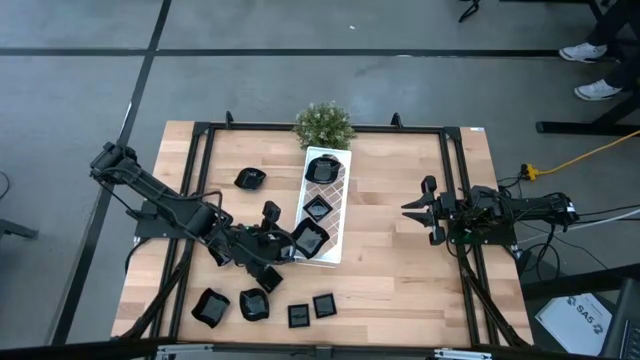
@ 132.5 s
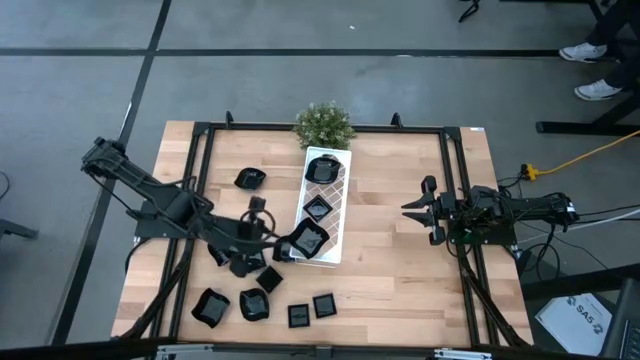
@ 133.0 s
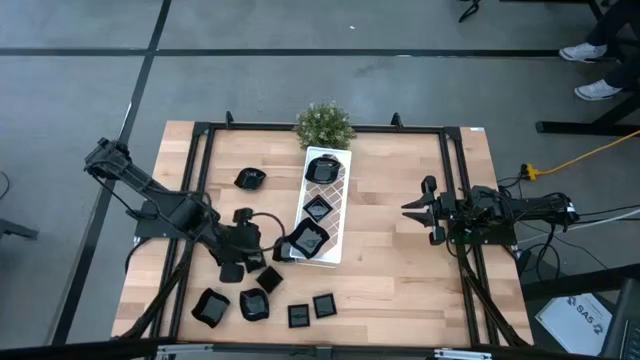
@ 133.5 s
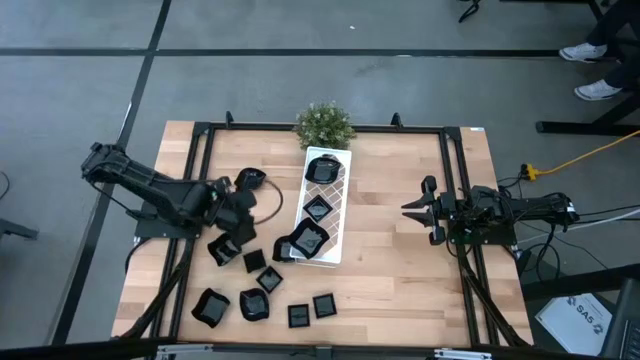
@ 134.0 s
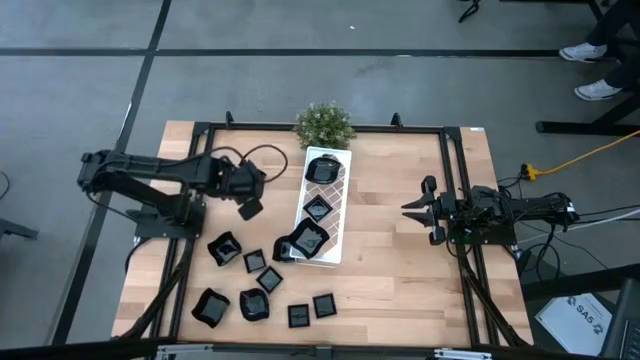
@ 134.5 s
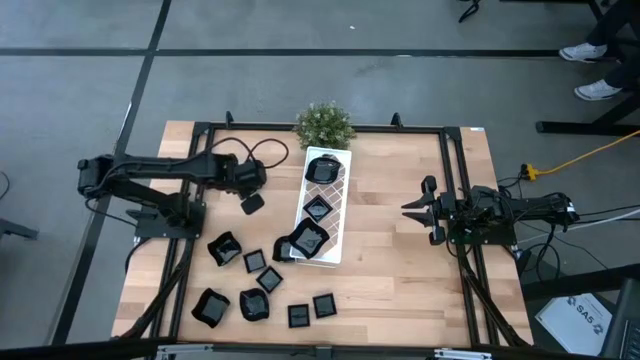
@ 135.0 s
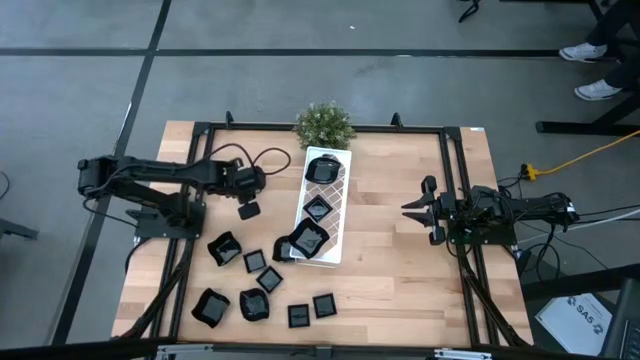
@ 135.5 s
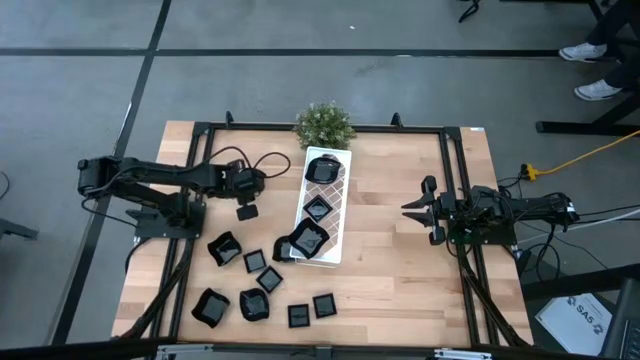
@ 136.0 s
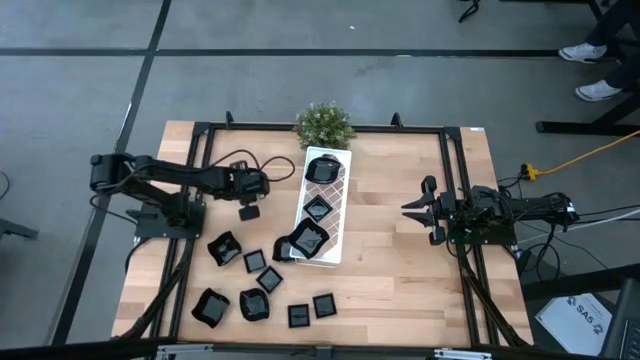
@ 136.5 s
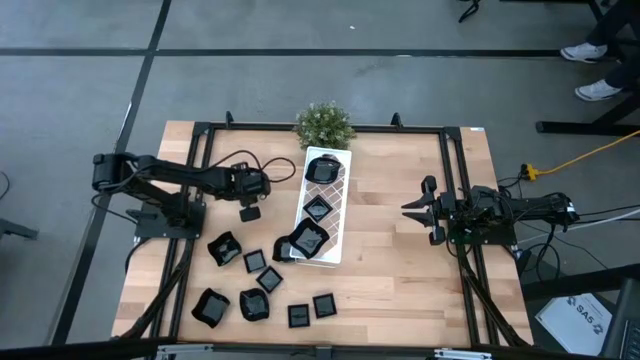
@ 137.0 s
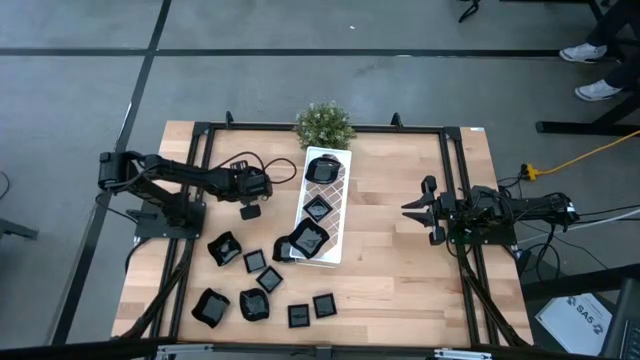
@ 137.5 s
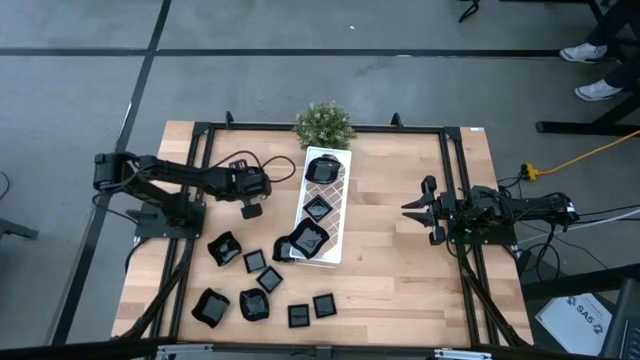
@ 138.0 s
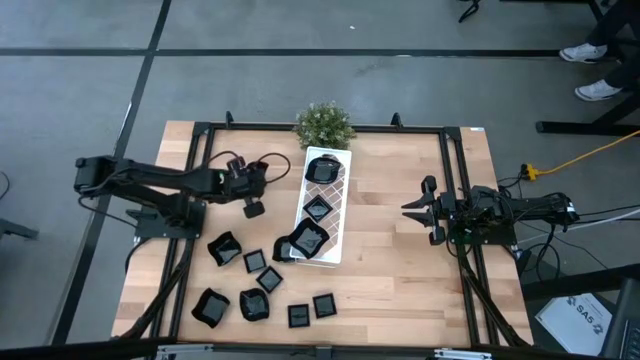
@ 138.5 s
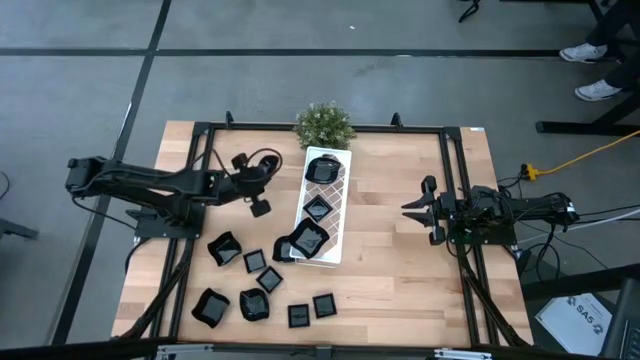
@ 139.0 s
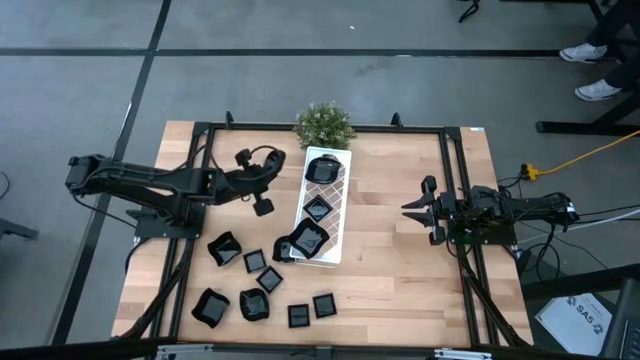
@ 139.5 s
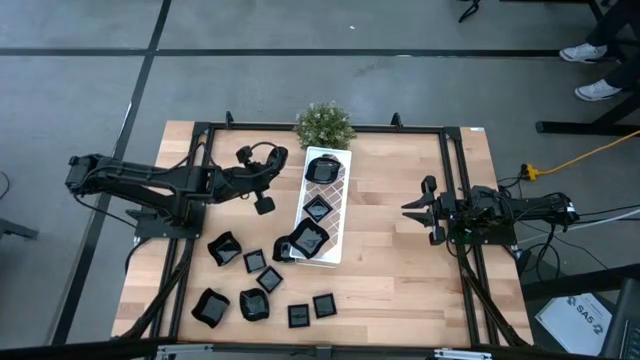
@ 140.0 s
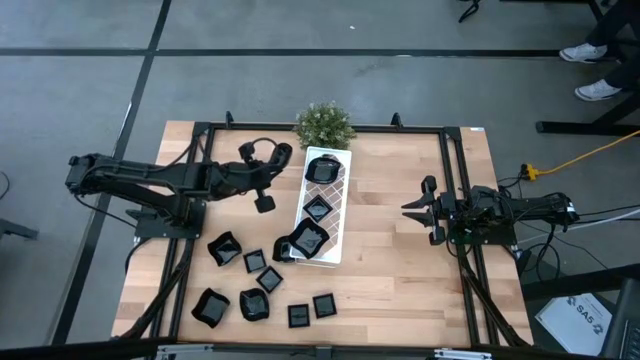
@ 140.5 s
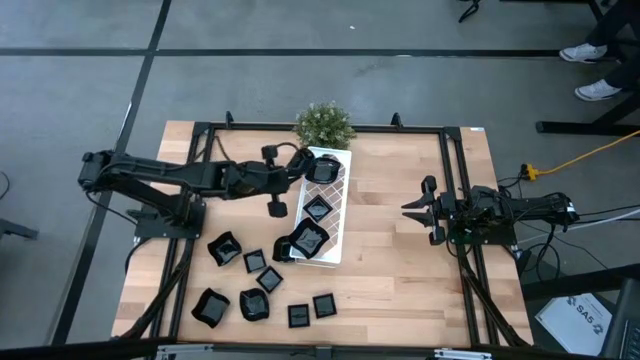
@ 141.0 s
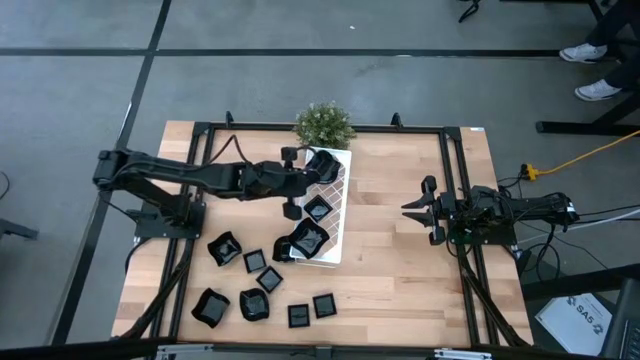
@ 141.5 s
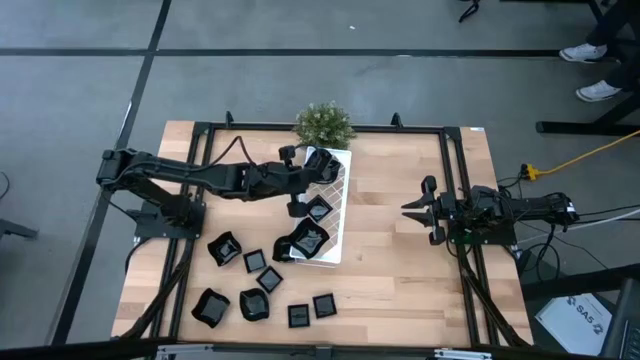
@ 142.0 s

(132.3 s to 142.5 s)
Task: Pick & Place Mini shaped plates
Stack the top leaf shaped plate on top of the leaf shaped plate on the shelf

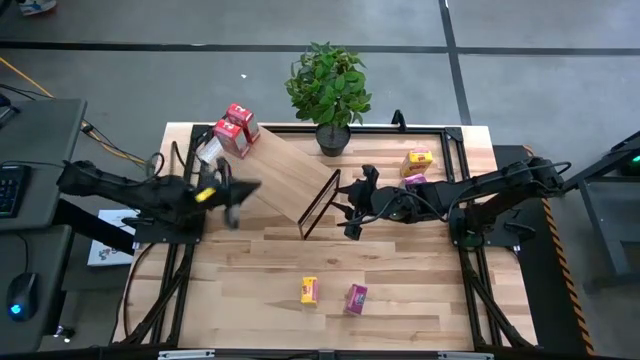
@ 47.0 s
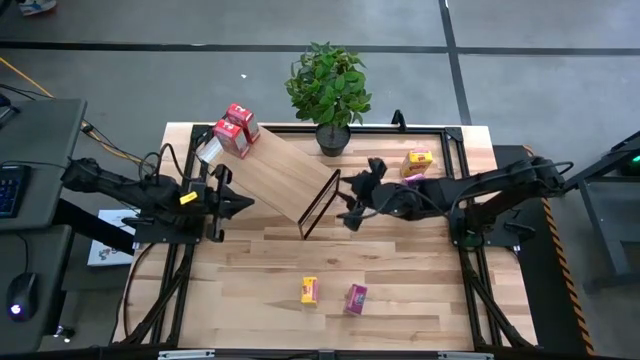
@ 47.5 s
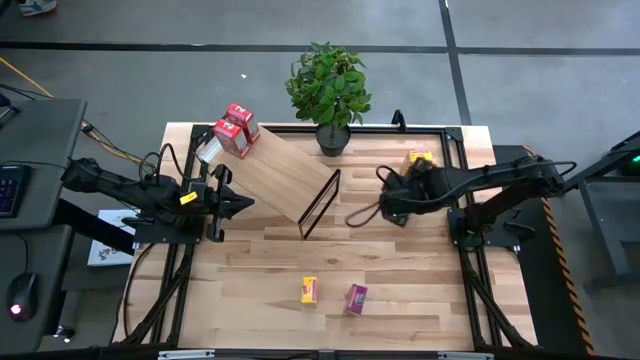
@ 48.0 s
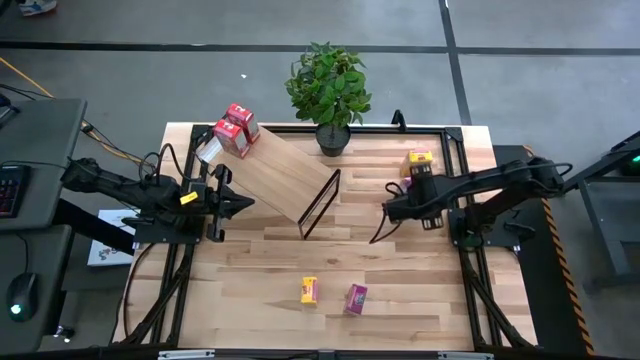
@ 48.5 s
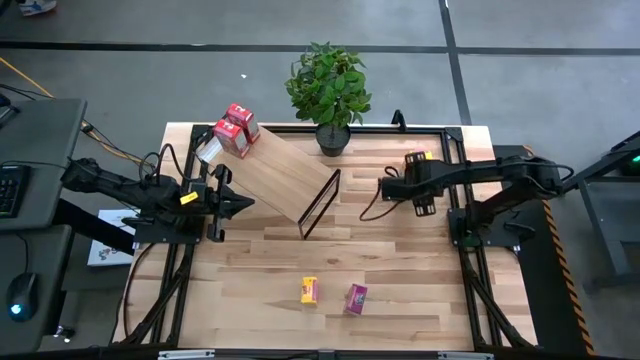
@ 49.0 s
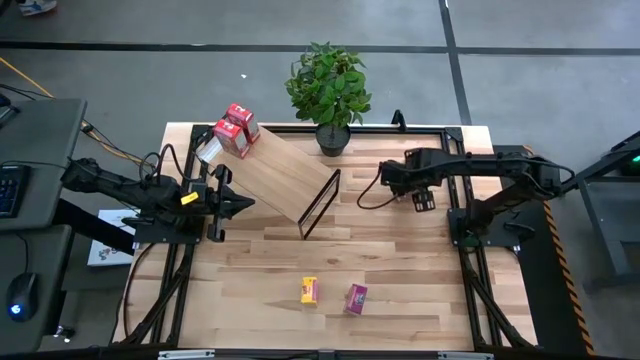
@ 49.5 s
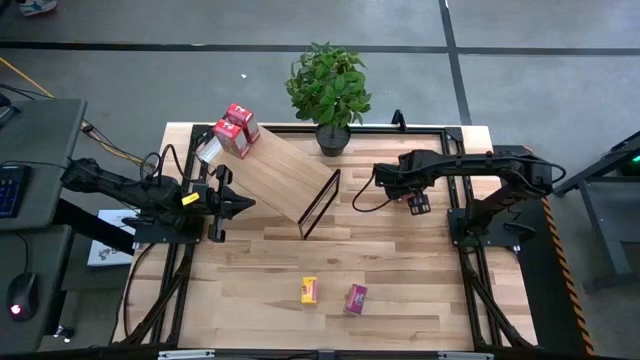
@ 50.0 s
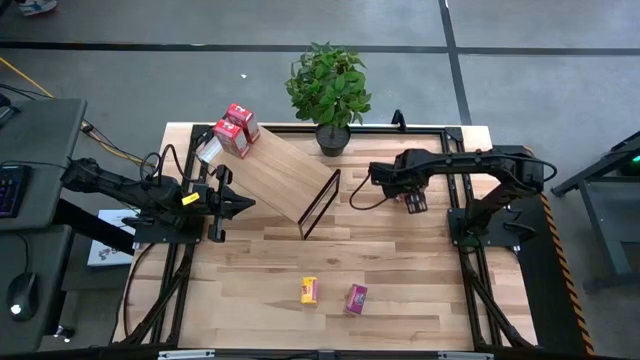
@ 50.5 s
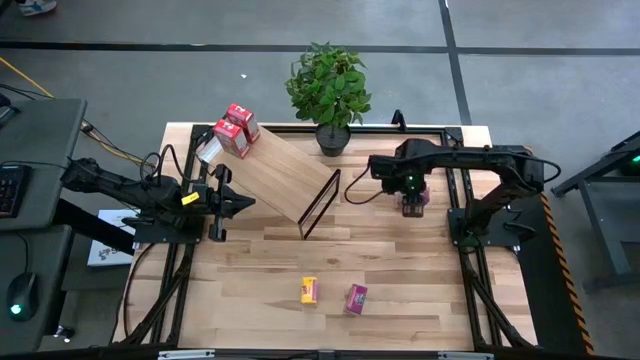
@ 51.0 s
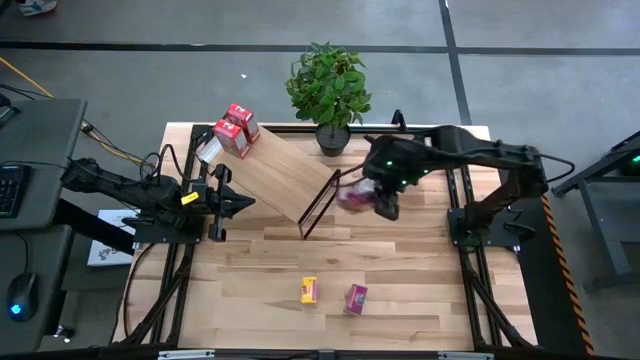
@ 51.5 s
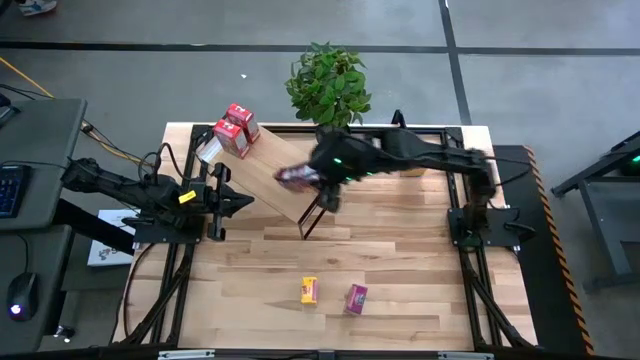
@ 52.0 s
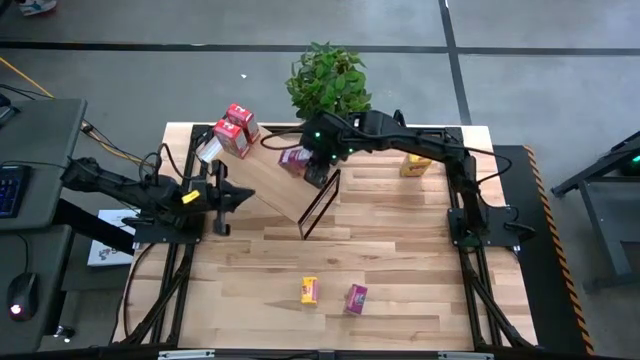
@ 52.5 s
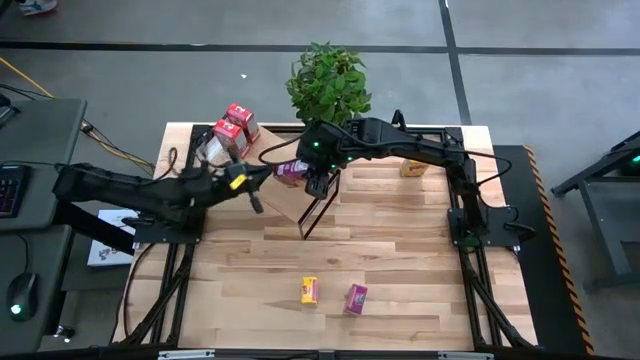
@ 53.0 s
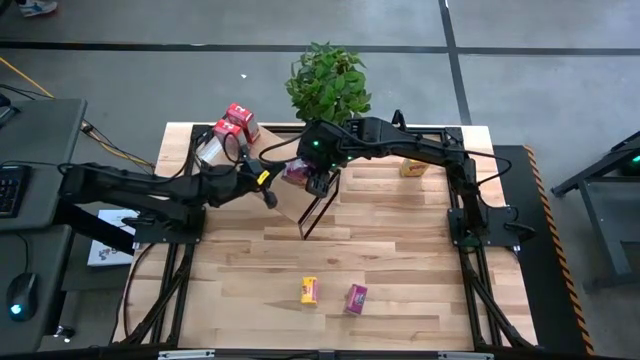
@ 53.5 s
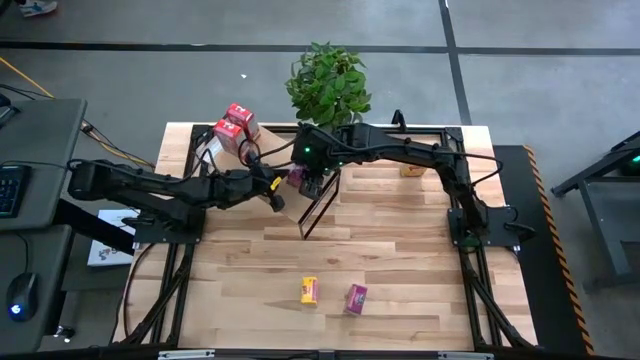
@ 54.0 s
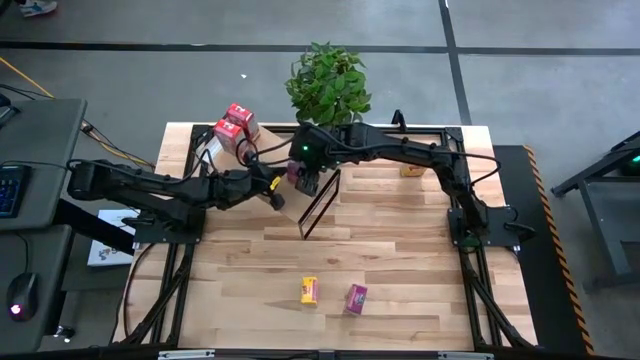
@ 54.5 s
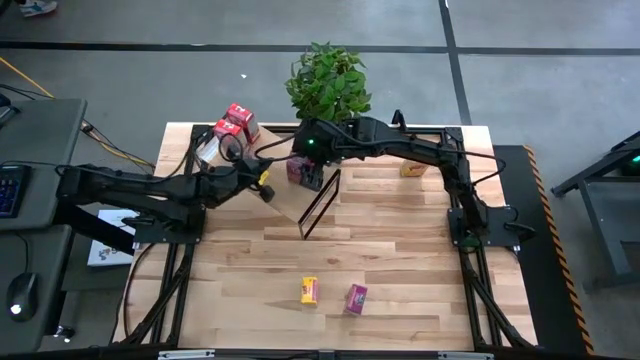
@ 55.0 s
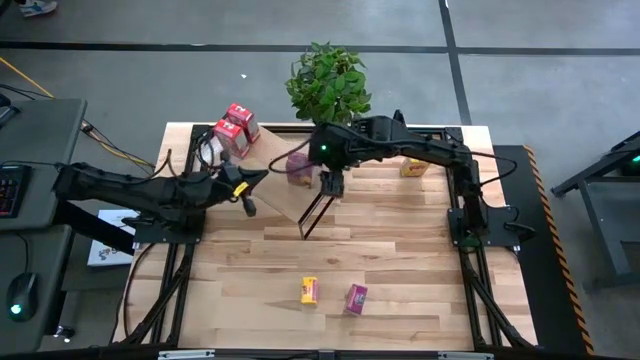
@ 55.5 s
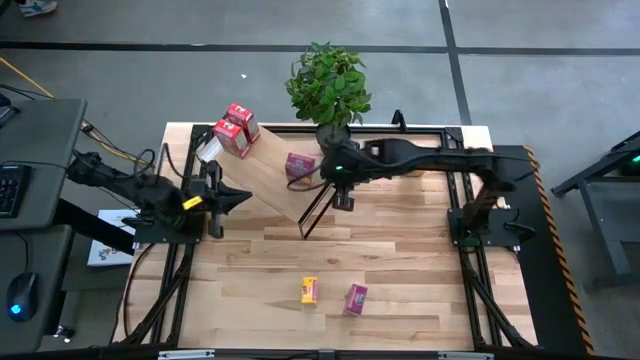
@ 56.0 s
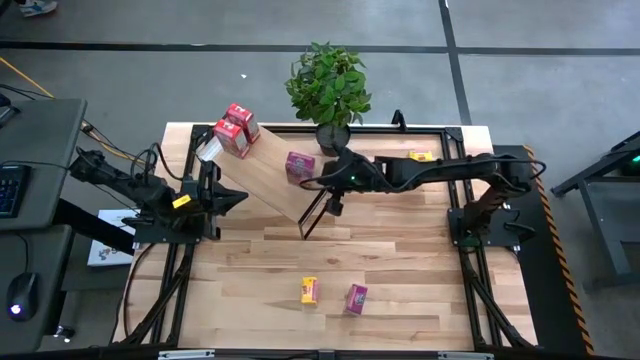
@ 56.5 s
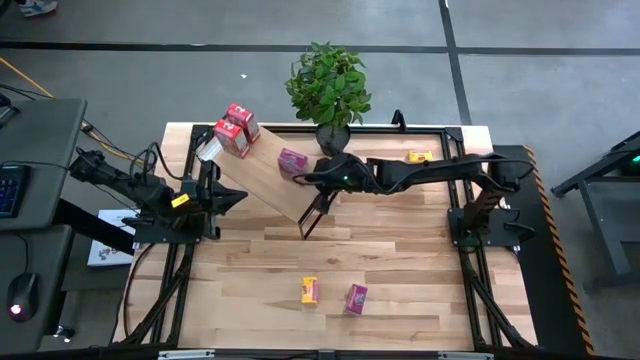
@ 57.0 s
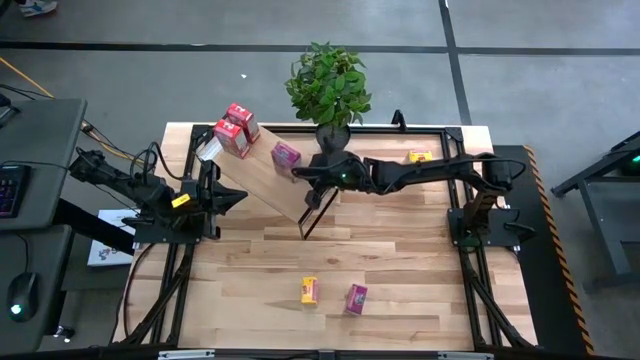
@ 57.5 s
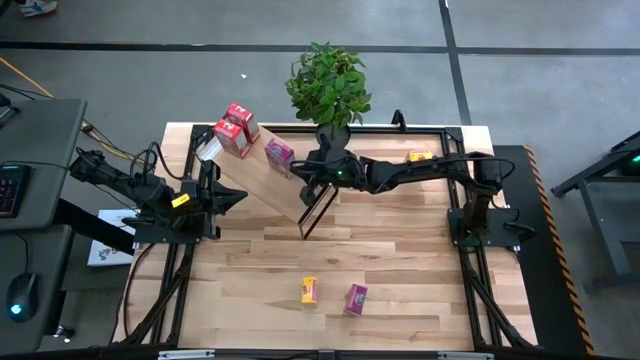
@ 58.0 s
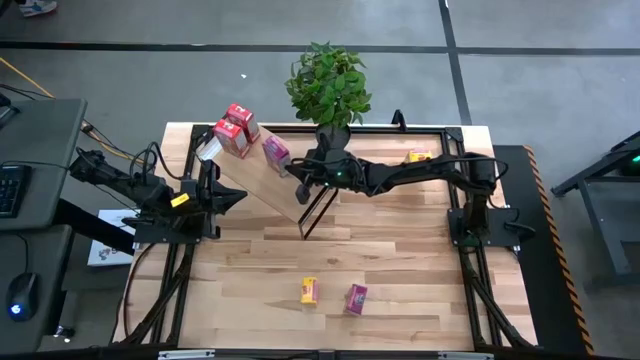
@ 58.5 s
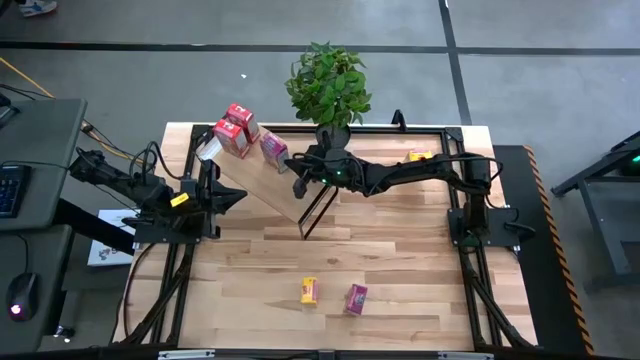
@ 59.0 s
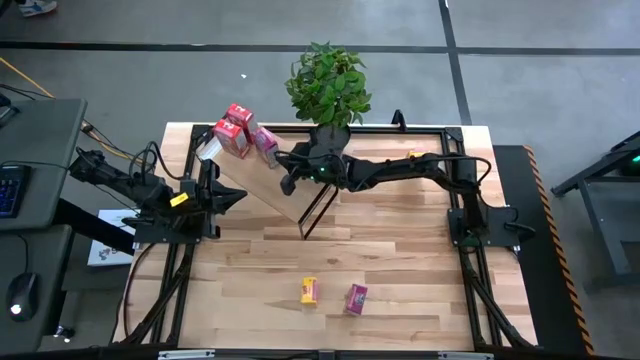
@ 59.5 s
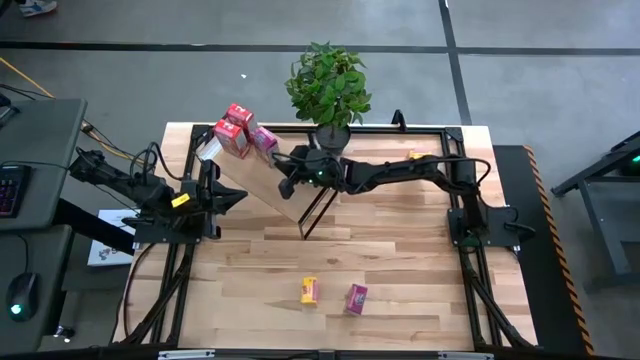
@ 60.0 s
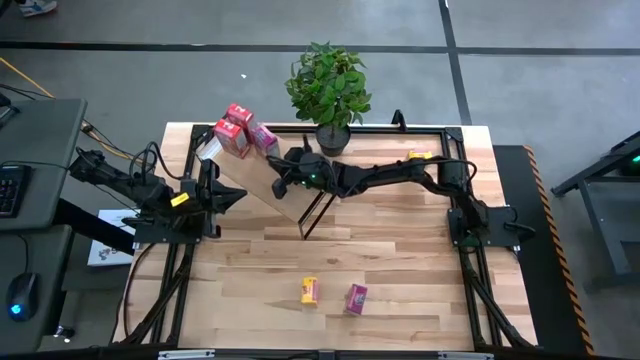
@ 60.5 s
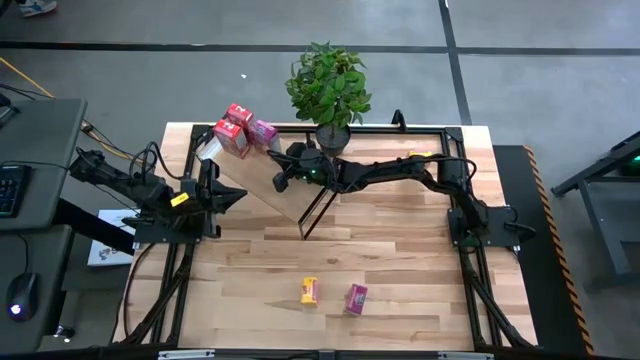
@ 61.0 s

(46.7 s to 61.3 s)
Task: Stack cereal on shelf
Put the top pink cereal box on the shelf
